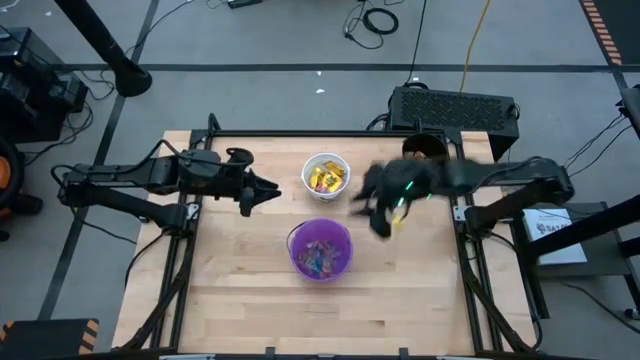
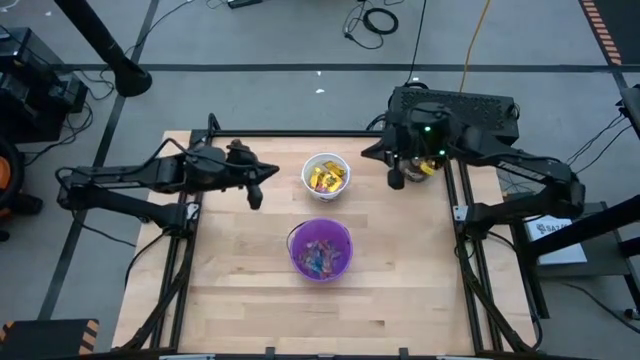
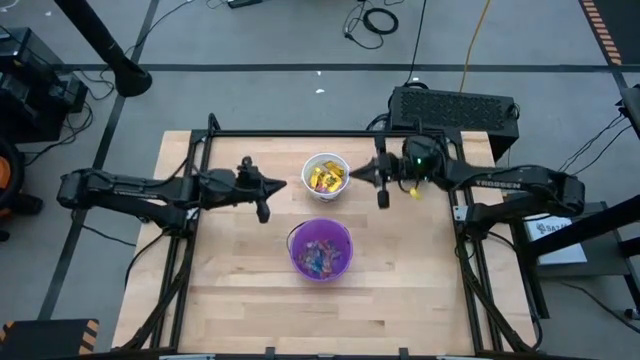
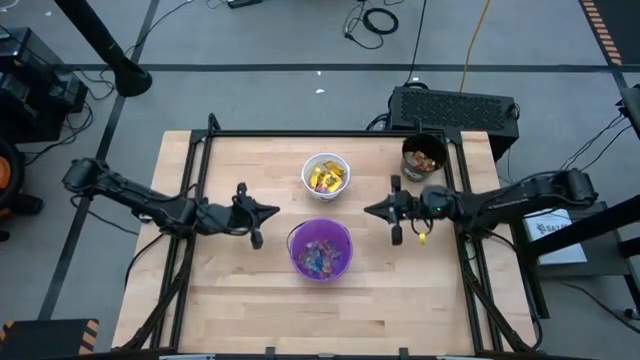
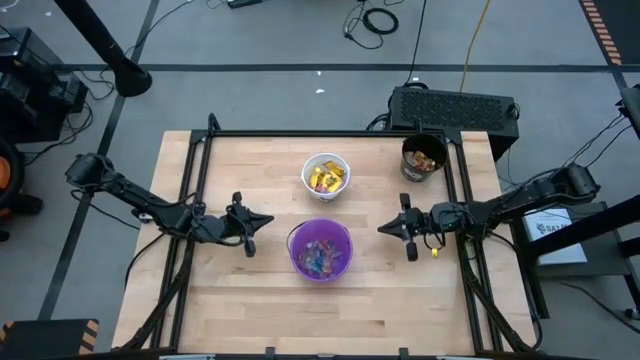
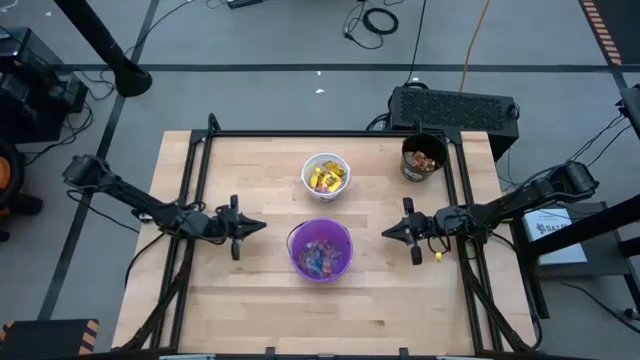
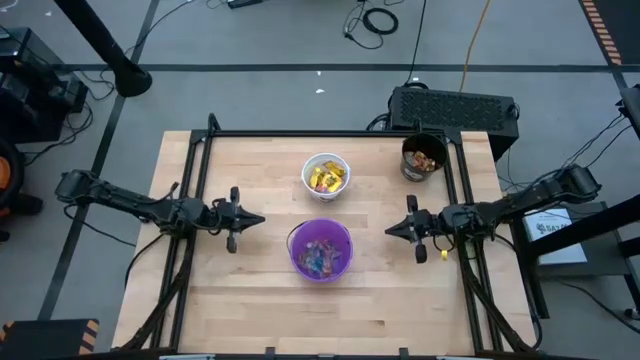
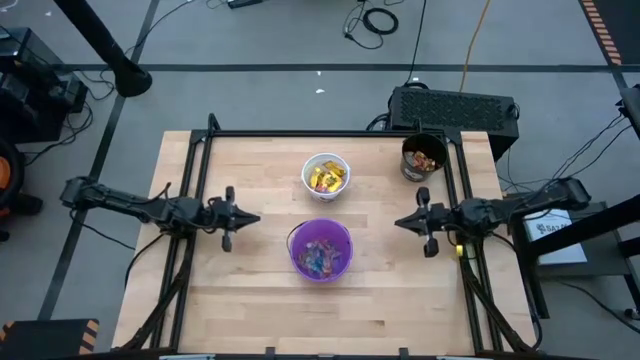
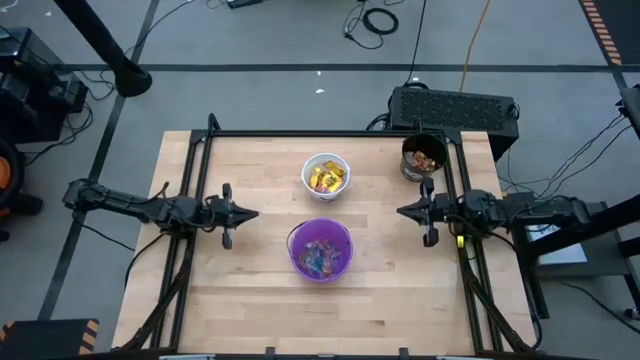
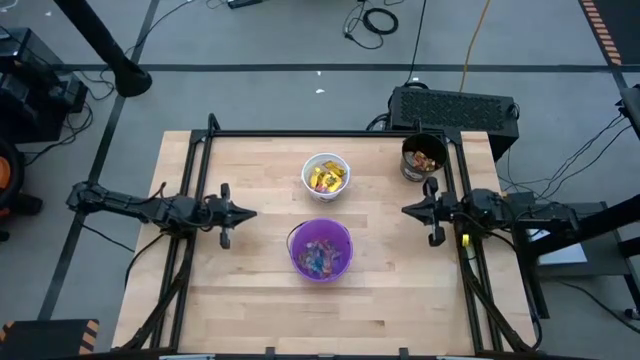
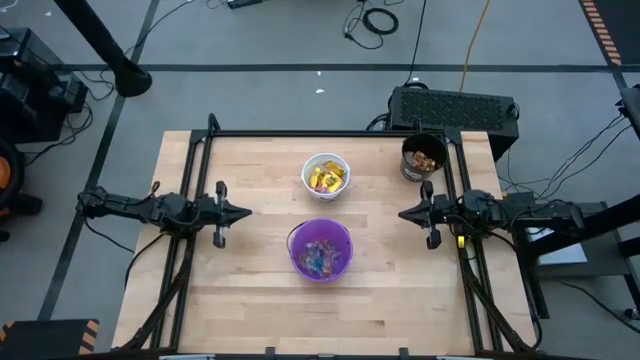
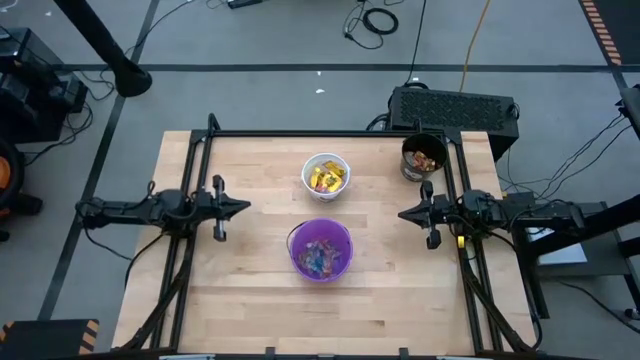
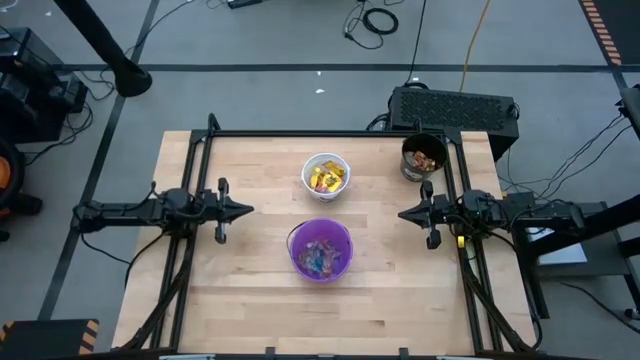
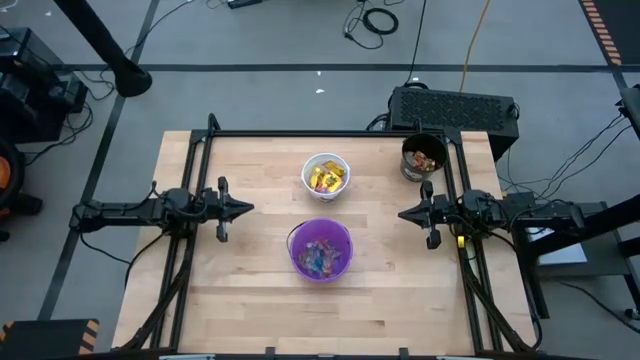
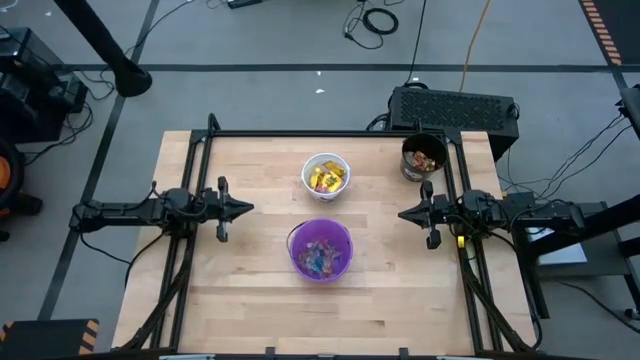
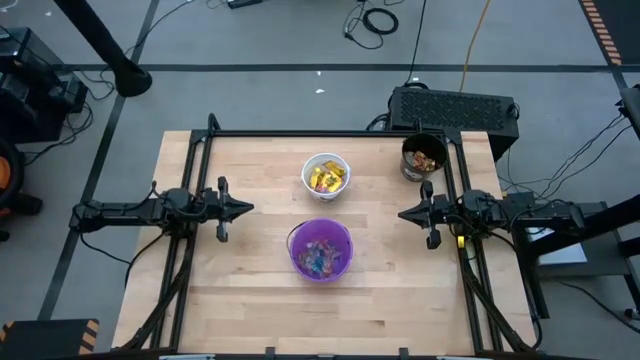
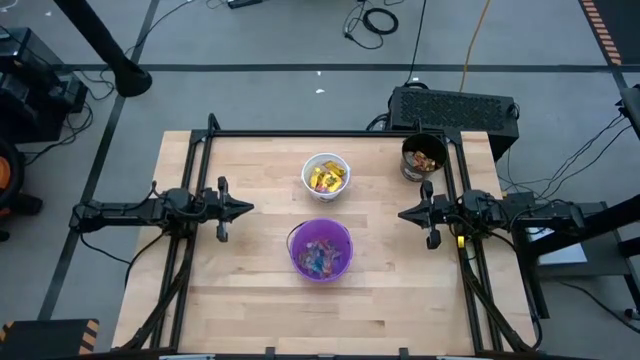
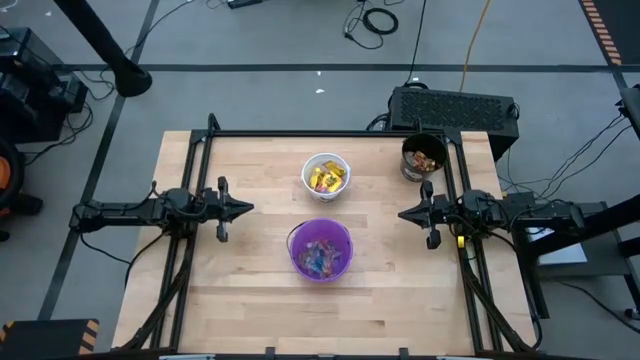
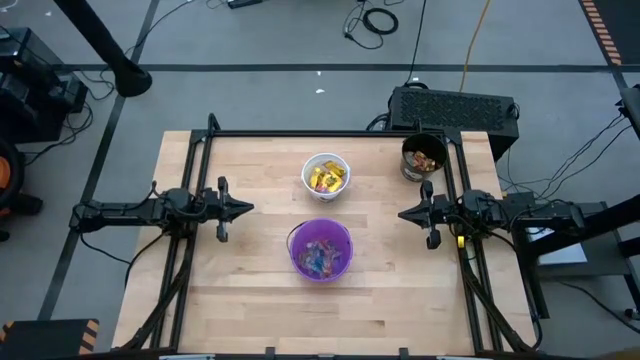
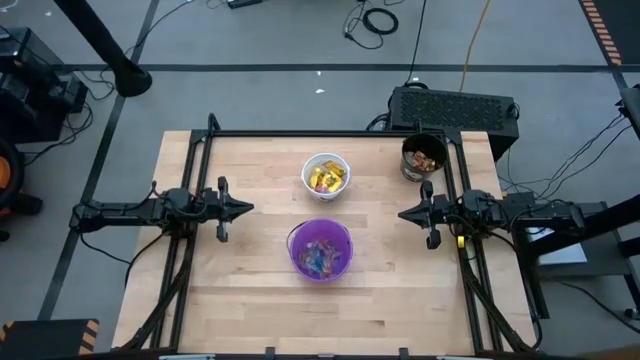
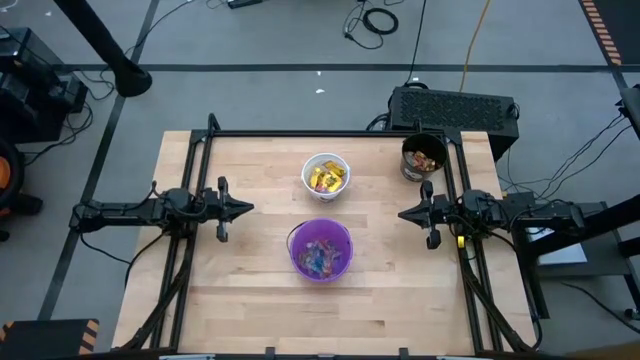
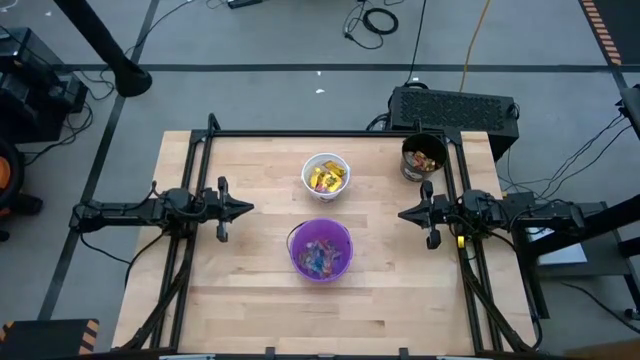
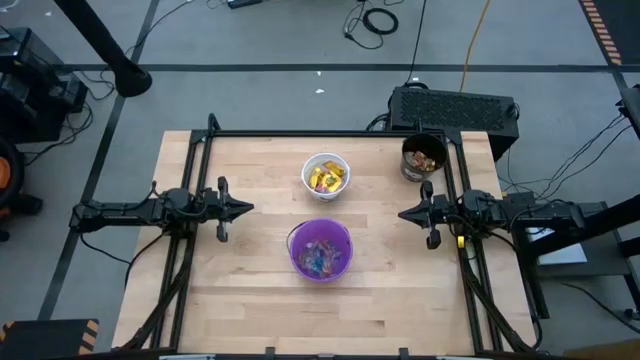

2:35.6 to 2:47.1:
Task: Sort candy by brand, put in halloween buckets
Return to Home Position

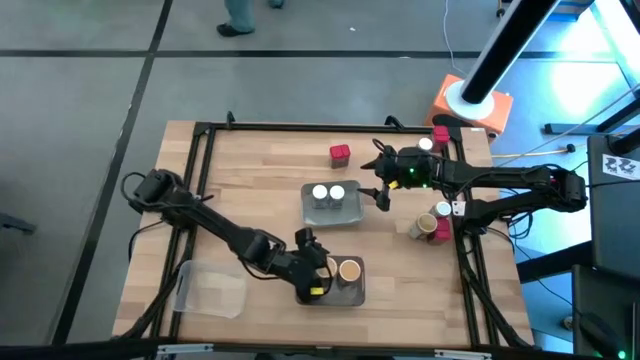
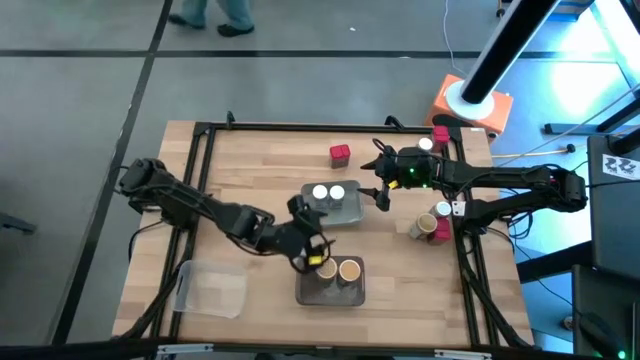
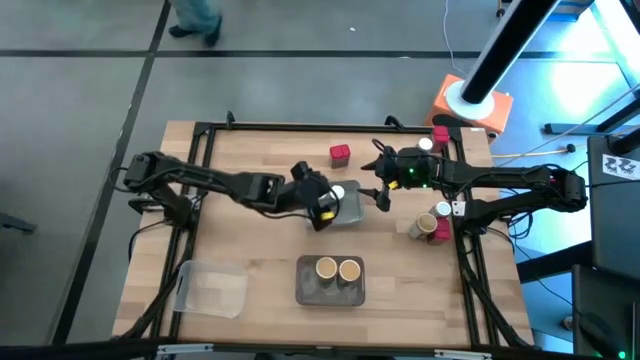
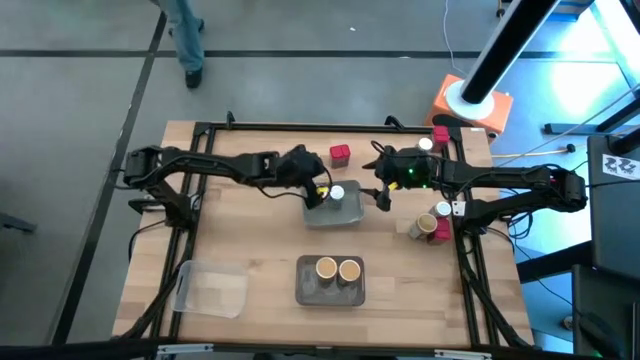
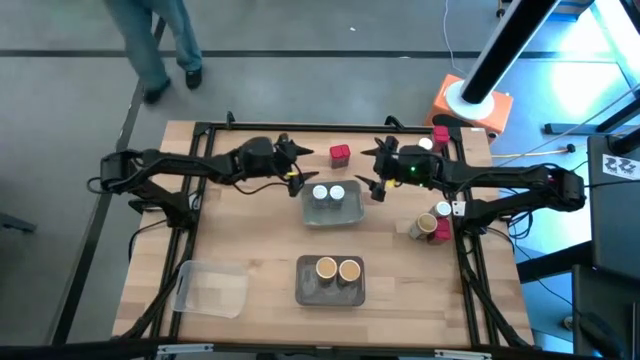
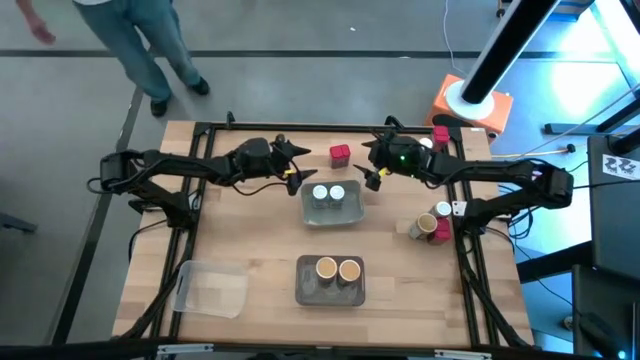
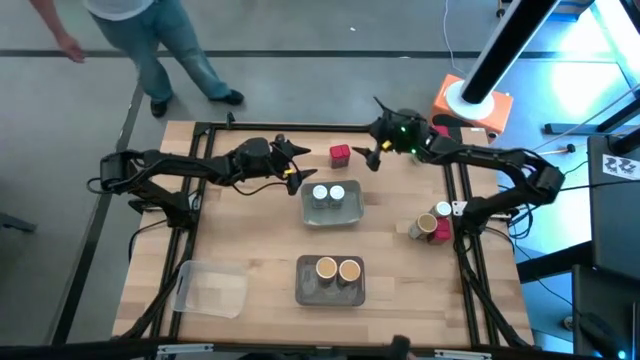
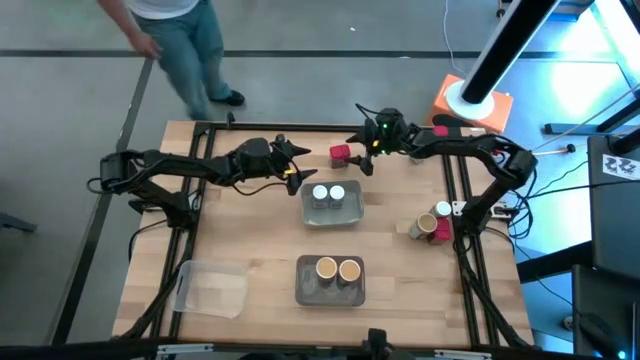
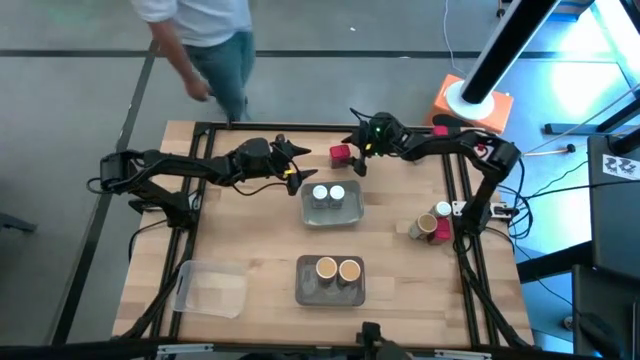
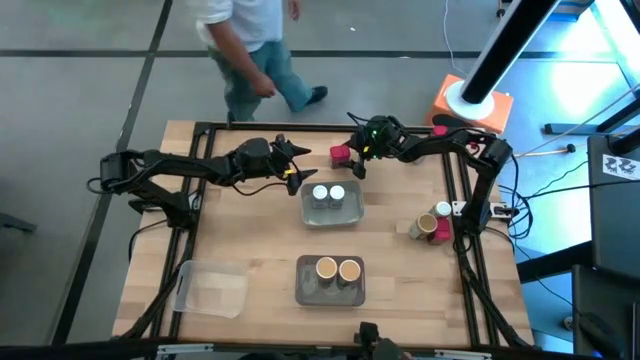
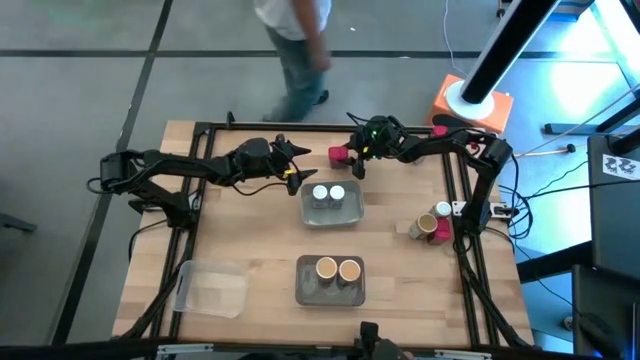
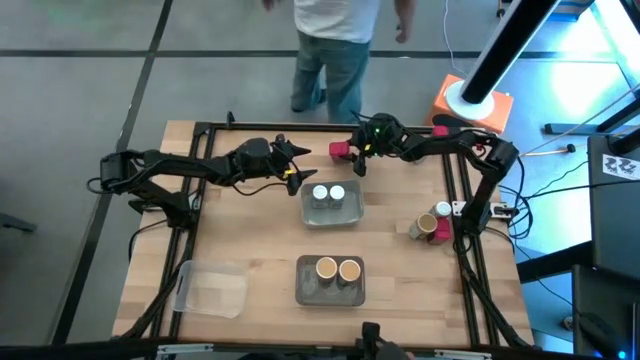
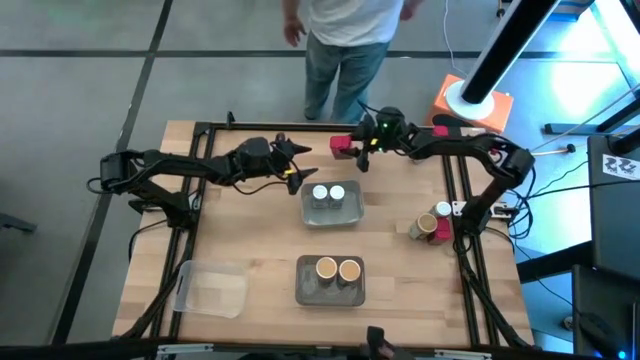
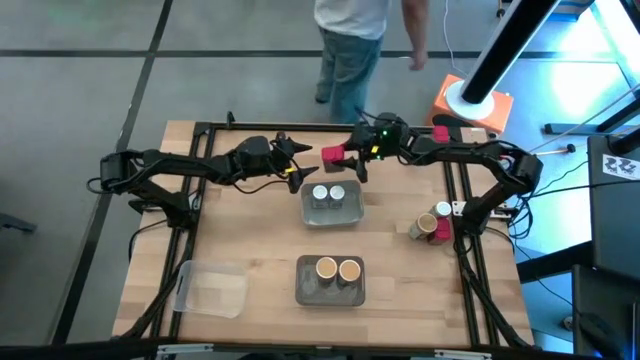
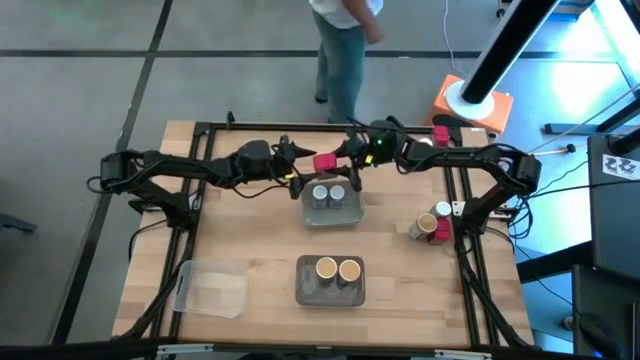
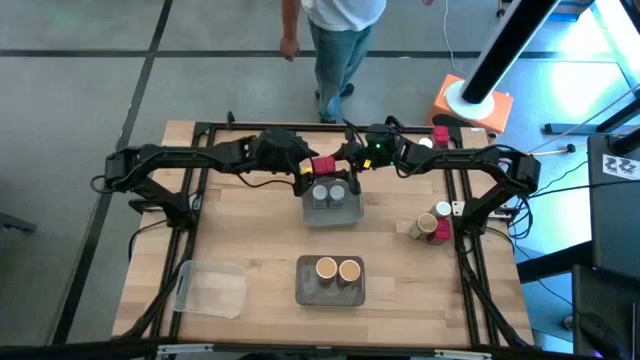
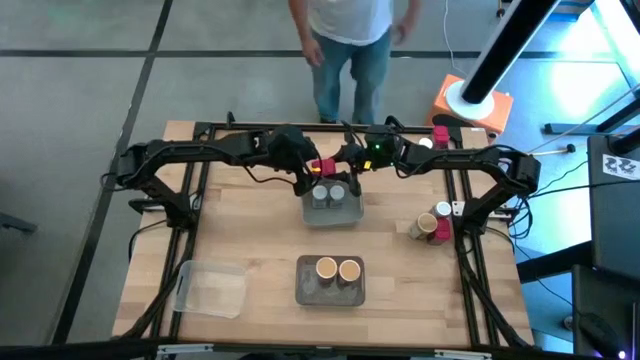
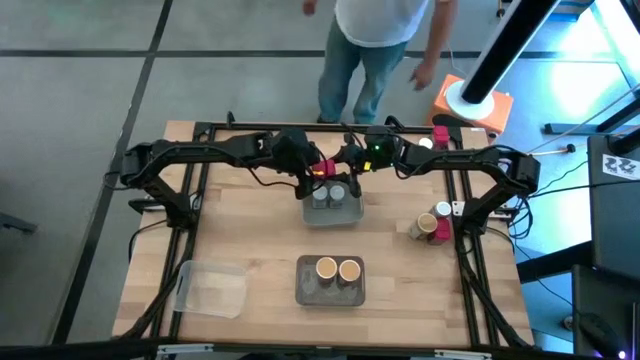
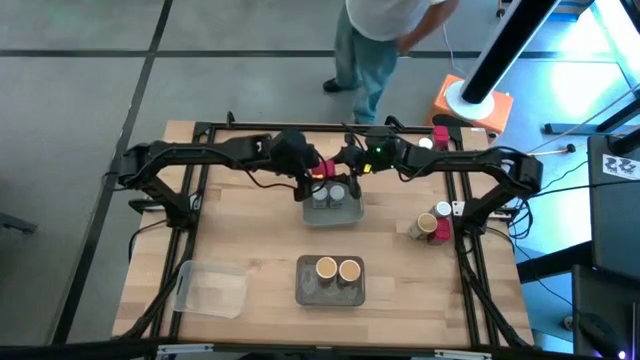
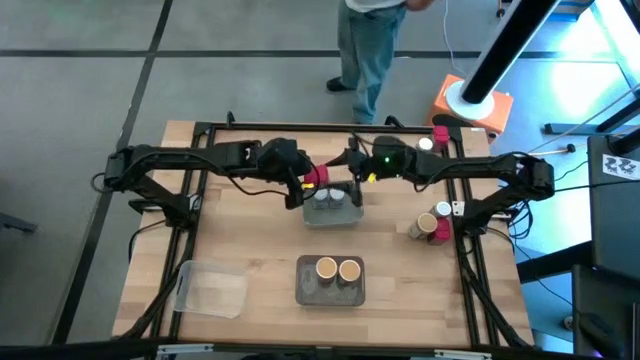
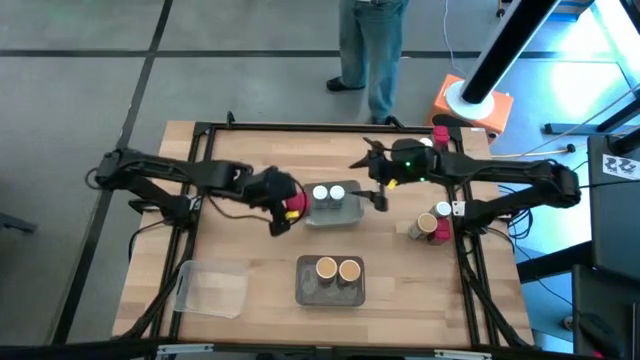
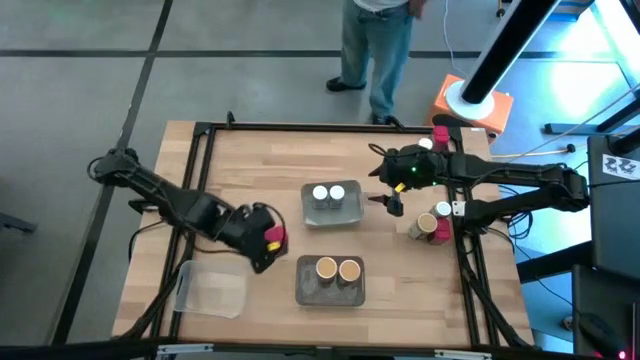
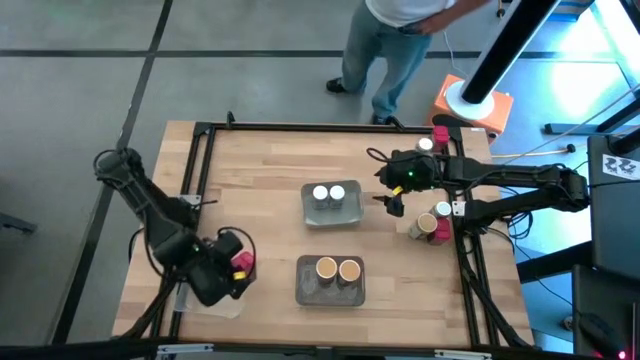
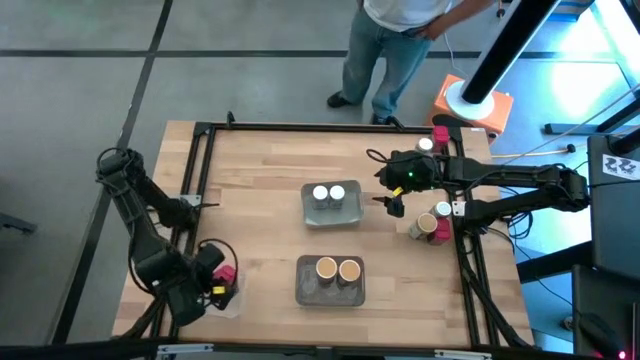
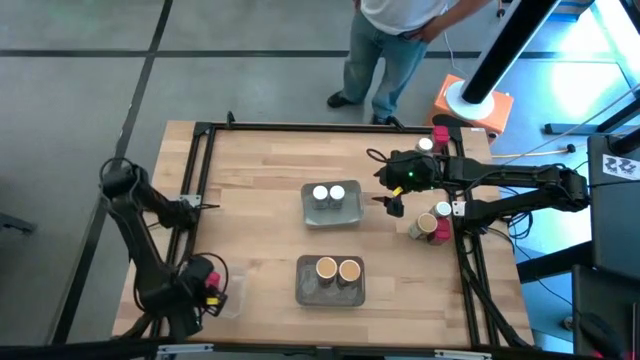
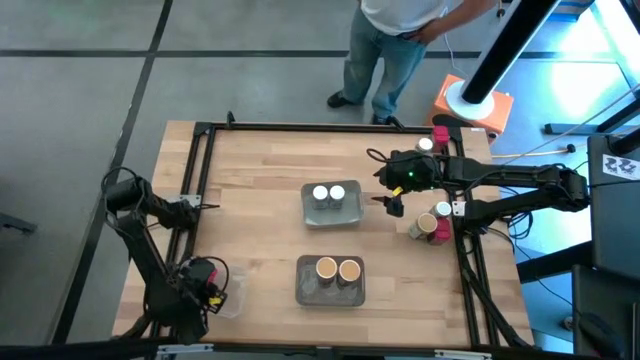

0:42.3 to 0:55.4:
Task: Sort spices by type
Put the top left red seasoning can into the transparent bin
